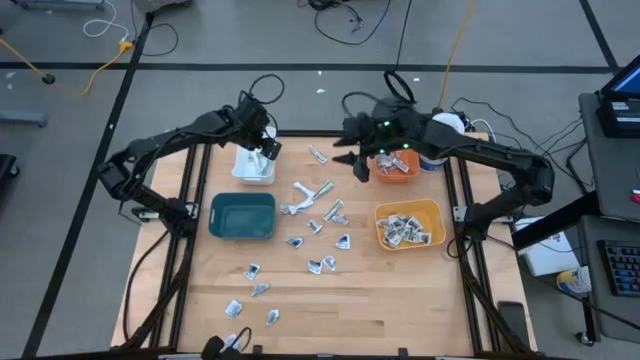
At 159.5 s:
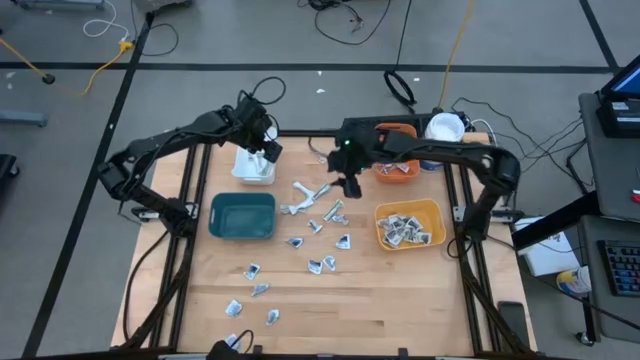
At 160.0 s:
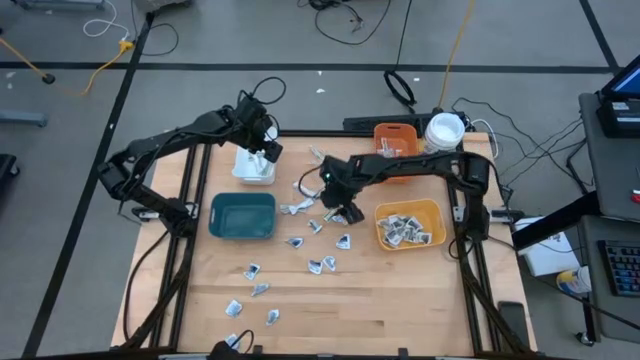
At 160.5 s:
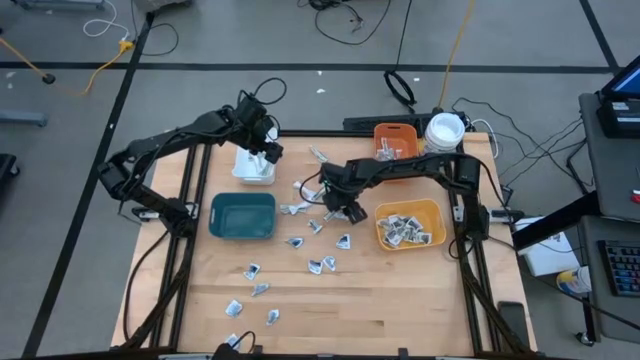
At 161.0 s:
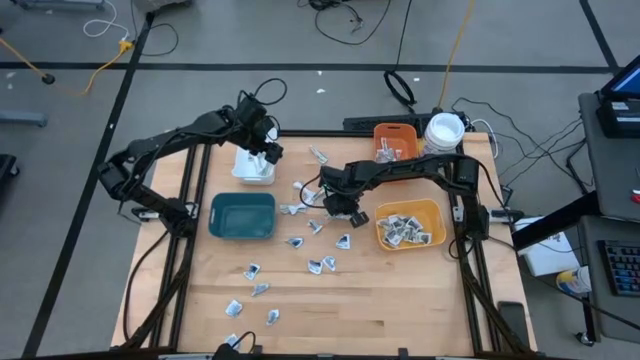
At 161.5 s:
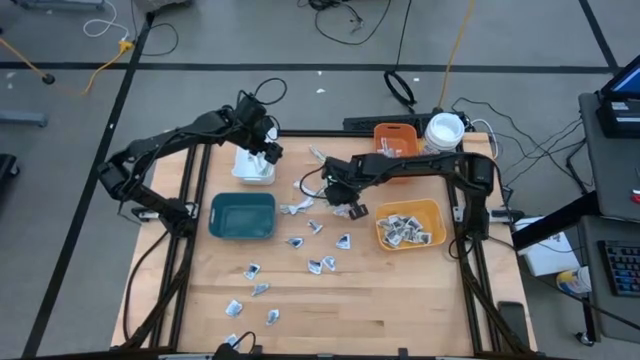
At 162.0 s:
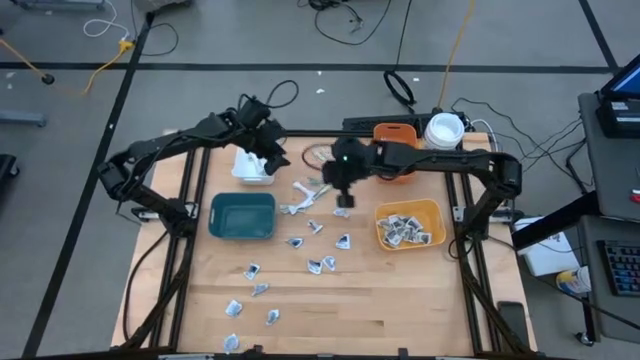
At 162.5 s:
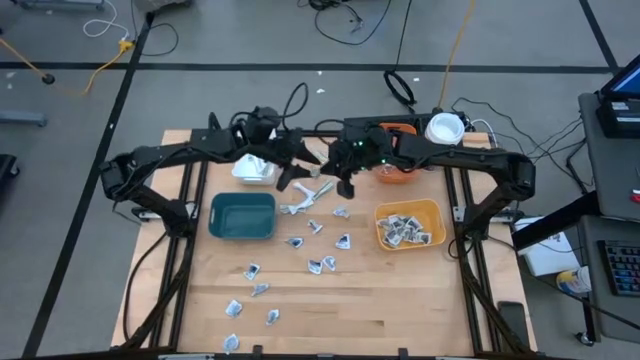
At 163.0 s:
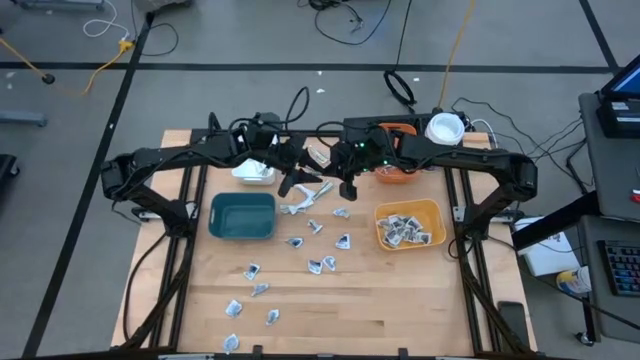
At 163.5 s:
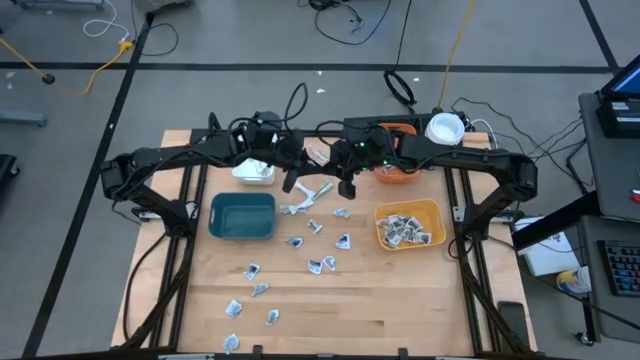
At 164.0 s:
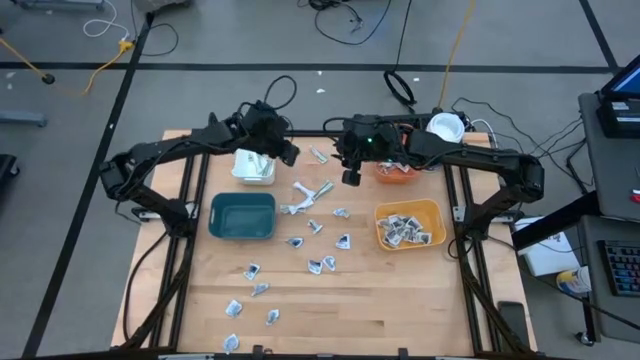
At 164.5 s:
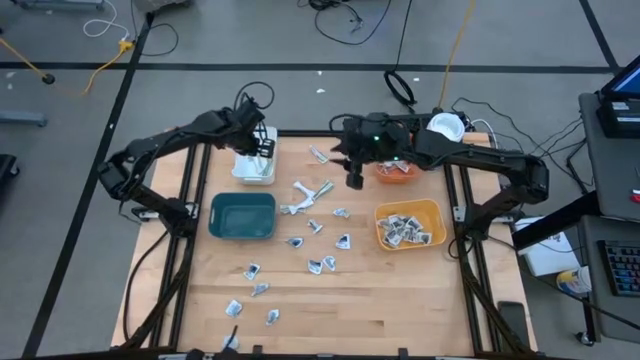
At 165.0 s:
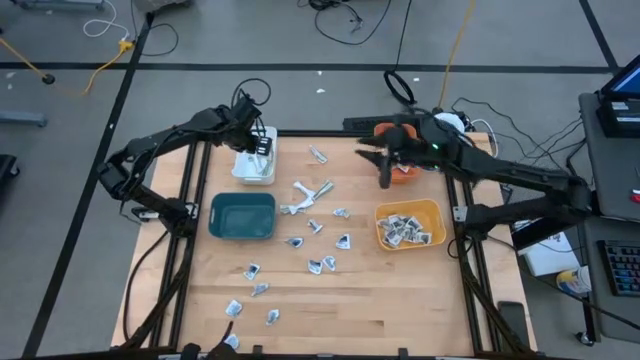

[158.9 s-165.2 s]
Task: Pick & Place First Aid Supplies
Put the bandage into the white bin

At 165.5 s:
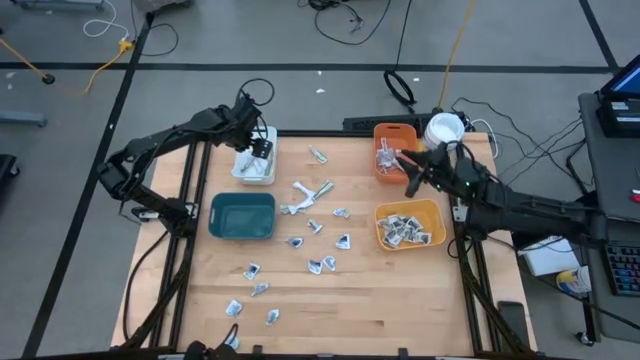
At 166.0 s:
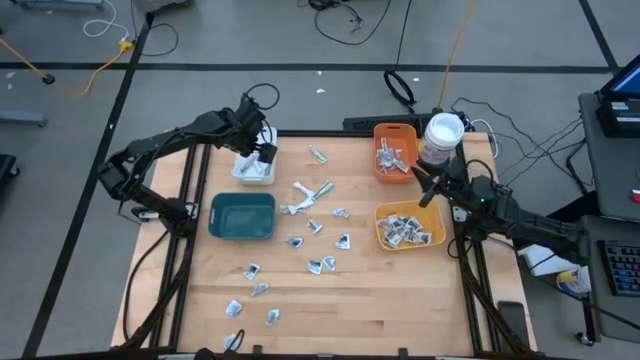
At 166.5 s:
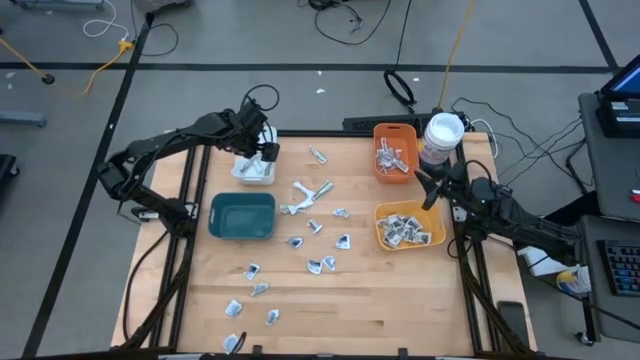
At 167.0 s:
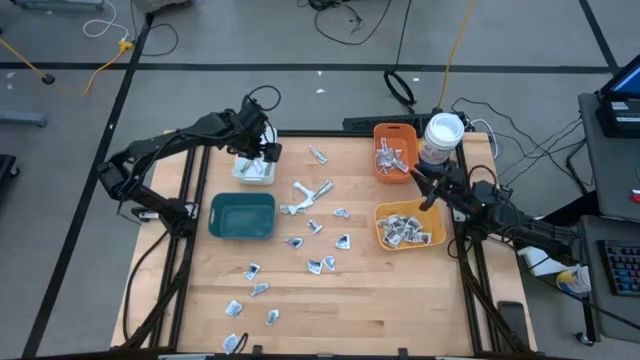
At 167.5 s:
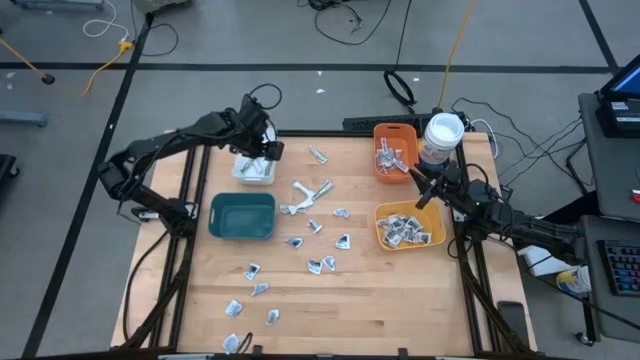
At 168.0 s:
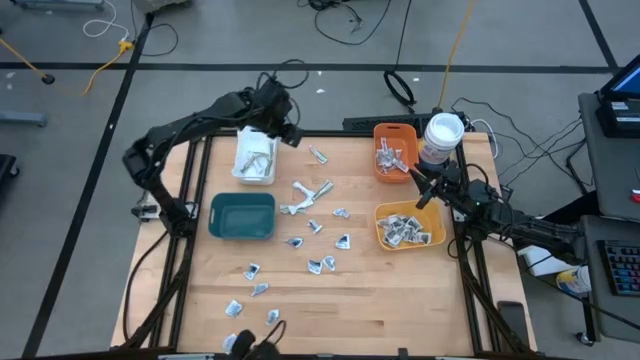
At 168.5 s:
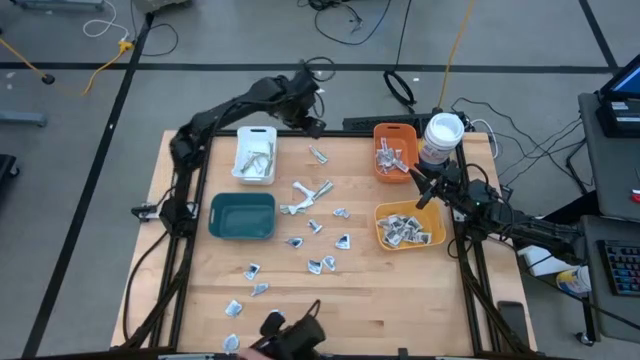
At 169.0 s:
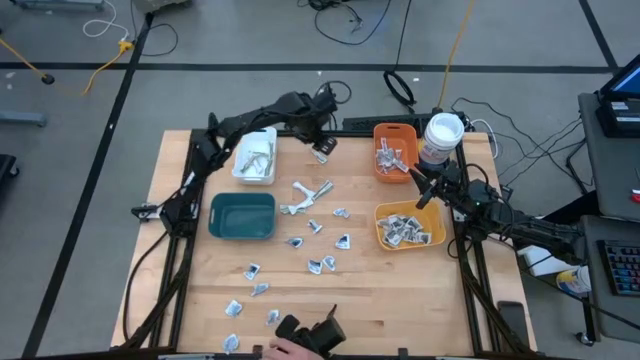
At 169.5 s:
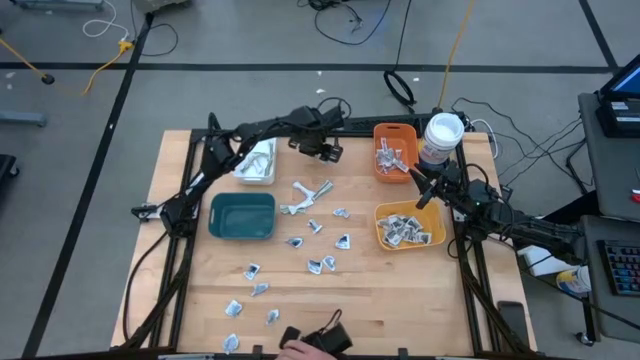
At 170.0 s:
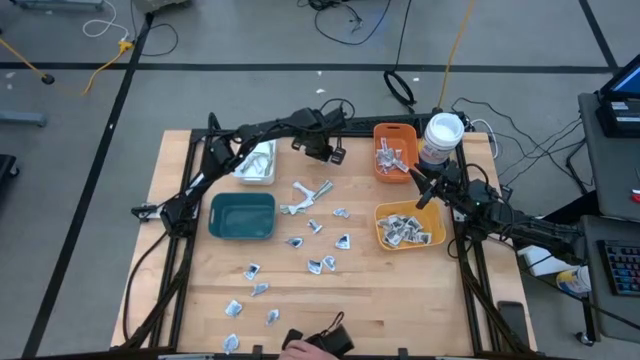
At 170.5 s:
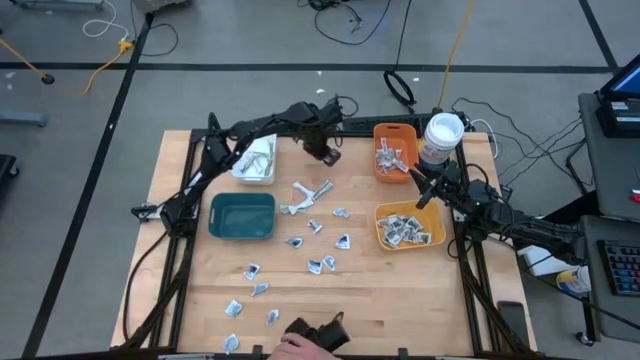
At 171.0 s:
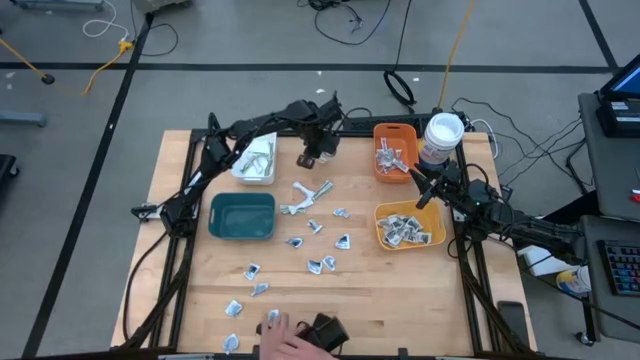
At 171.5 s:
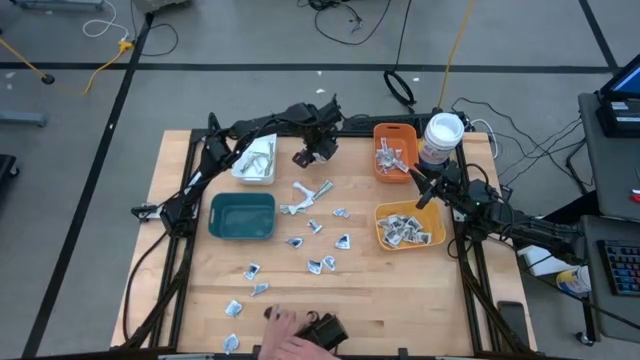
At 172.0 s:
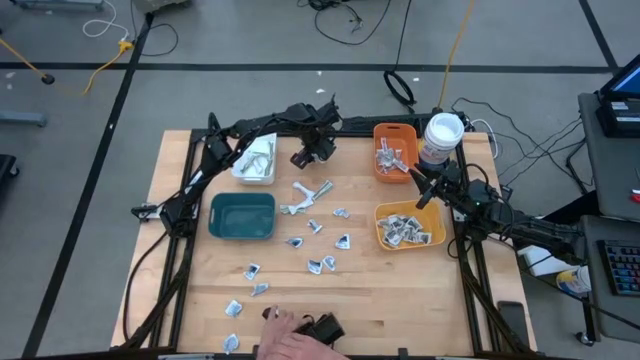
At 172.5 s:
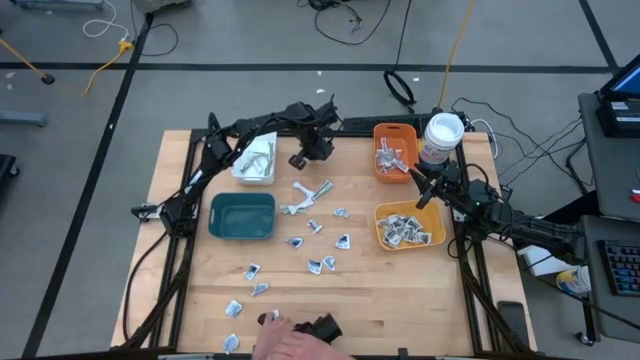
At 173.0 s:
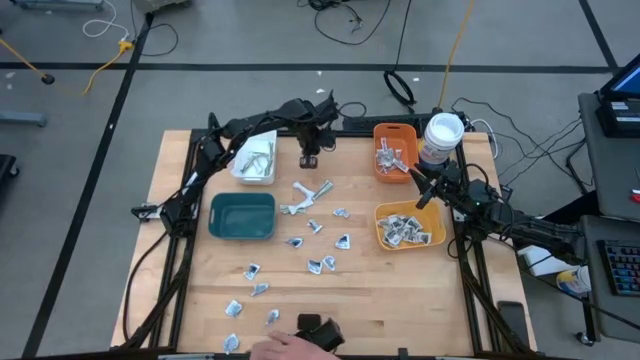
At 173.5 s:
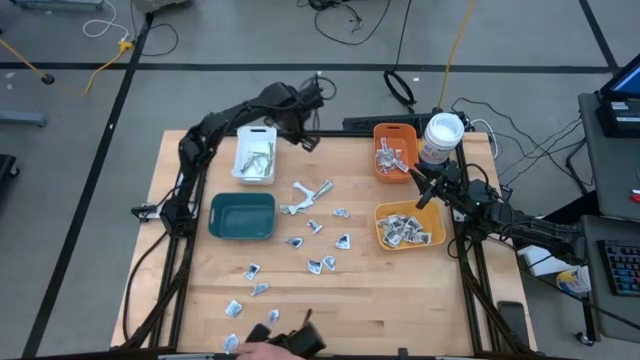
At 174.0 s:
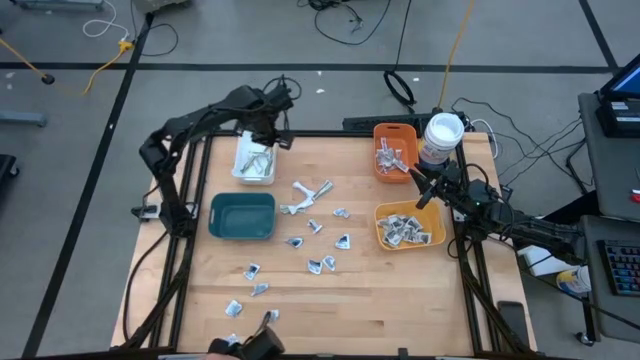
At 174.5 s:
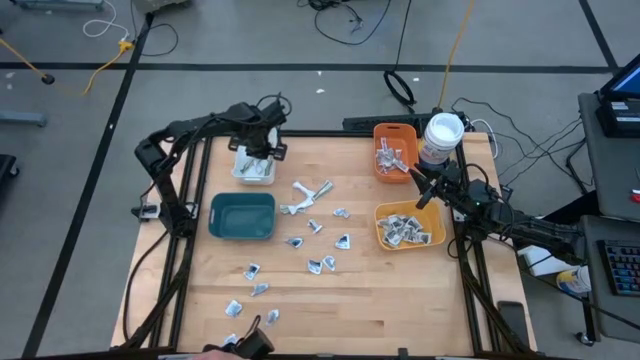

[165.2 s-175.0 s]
Put the bandage into the white bin

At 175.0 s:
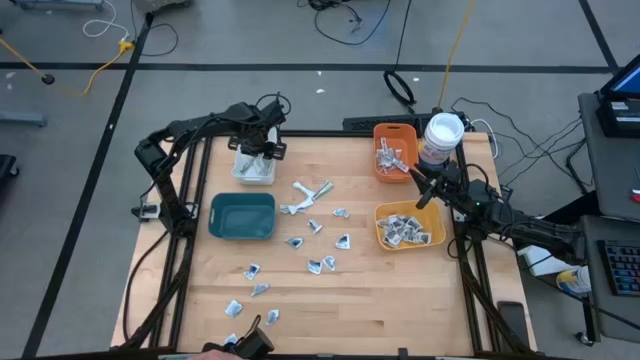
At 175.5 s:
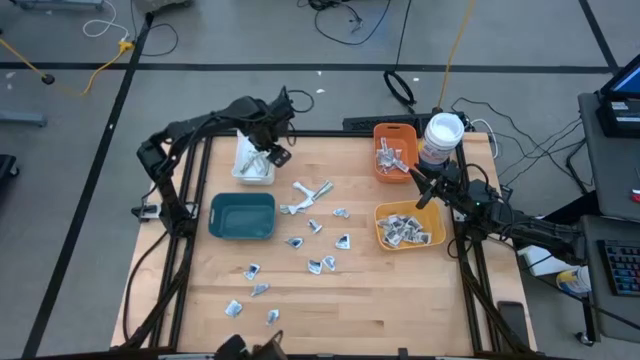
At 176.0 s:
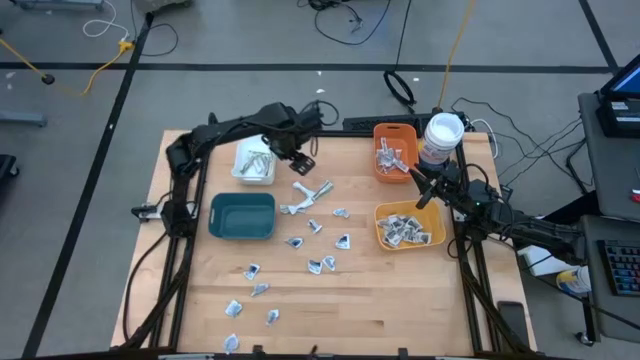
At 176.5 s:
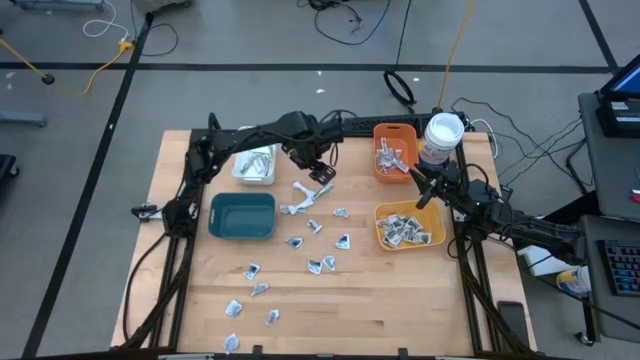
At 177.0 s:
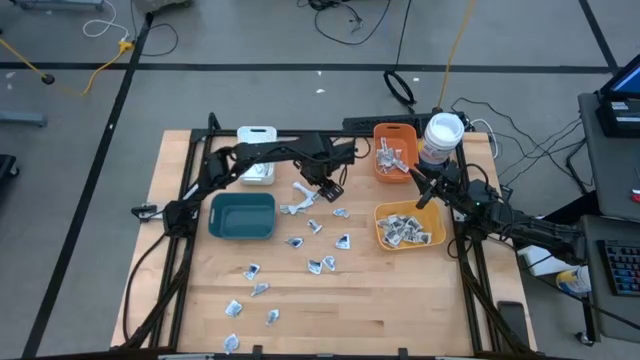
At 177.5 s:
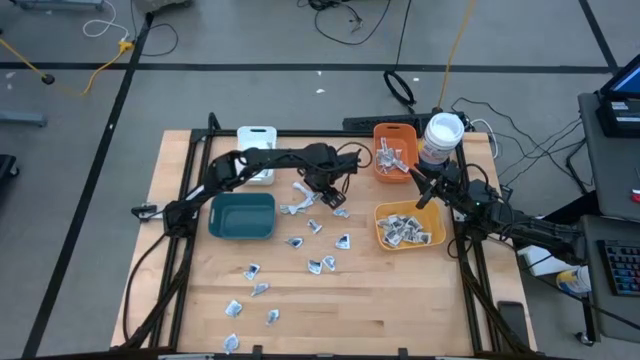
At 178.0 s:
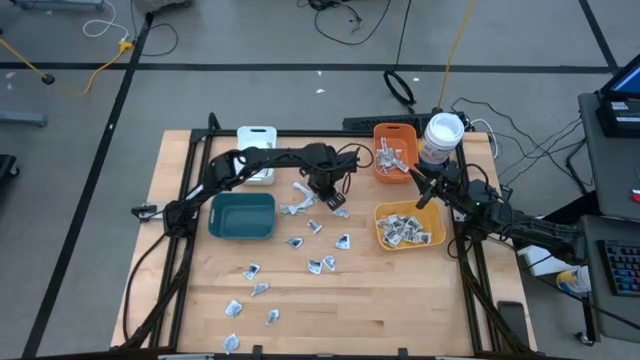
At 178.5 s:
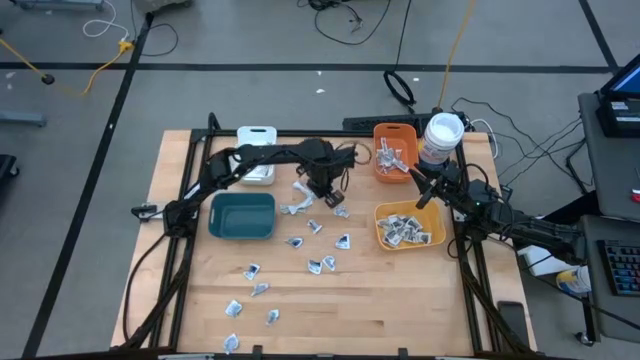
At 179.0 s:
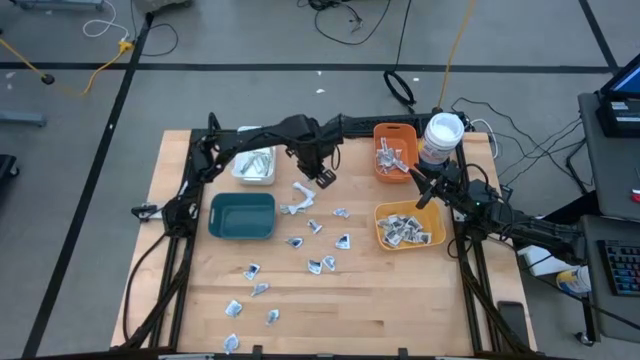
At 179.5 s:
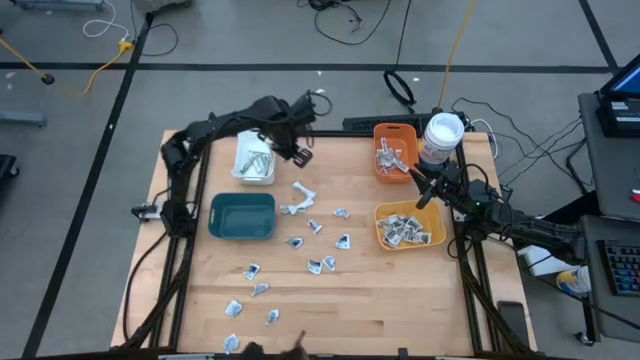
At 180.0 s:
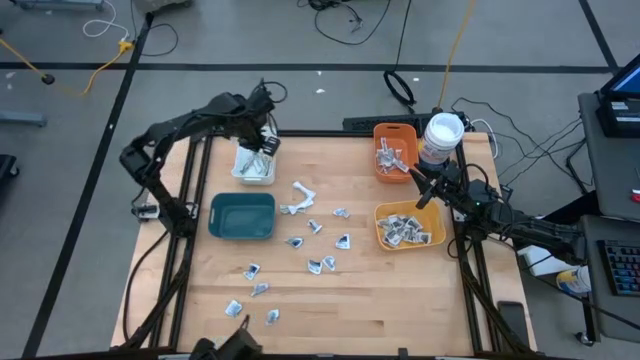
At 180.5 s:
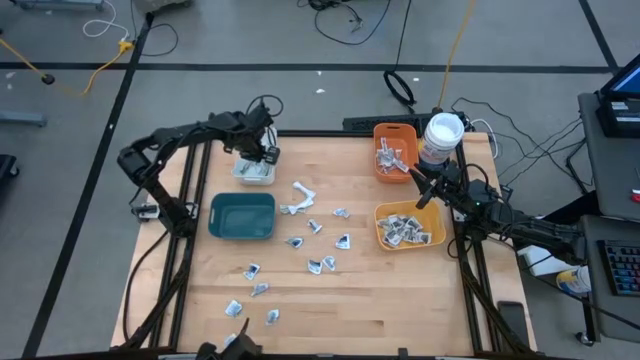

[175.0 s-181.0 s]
Put the bandage into the white bin
